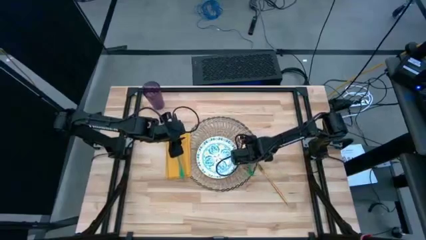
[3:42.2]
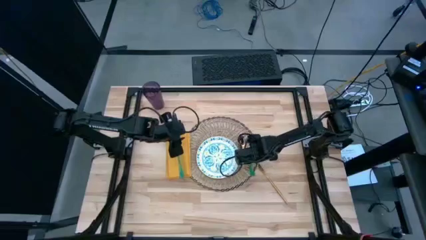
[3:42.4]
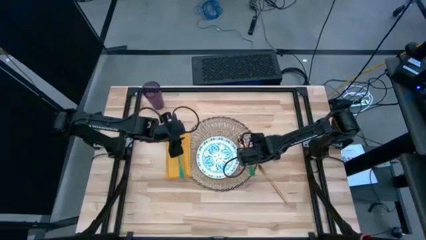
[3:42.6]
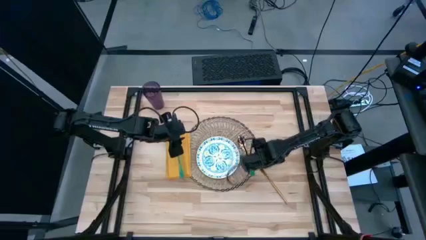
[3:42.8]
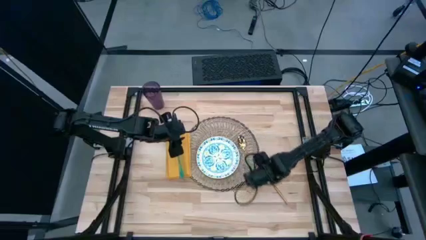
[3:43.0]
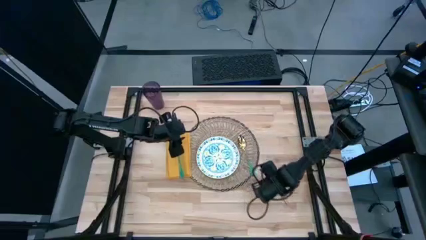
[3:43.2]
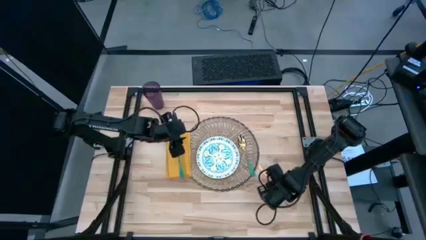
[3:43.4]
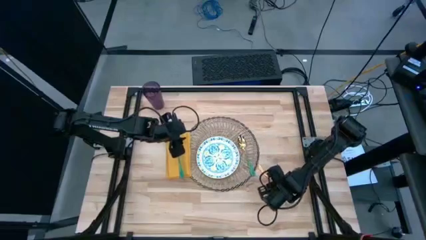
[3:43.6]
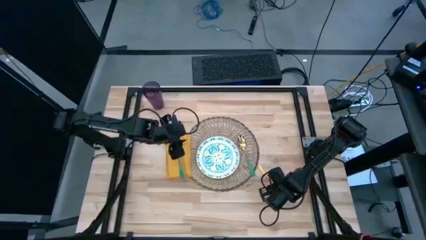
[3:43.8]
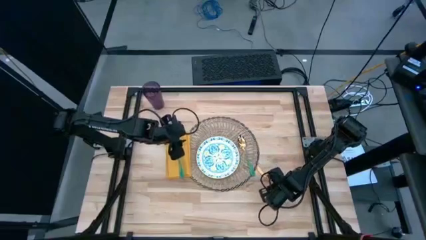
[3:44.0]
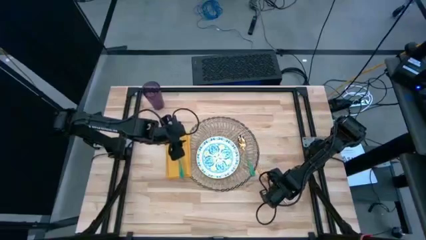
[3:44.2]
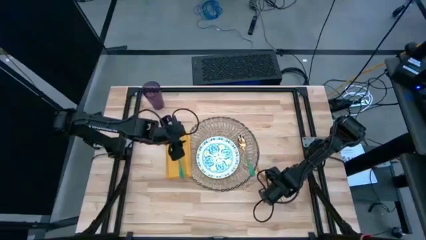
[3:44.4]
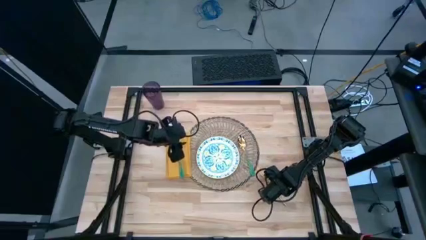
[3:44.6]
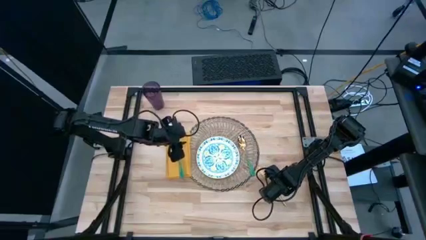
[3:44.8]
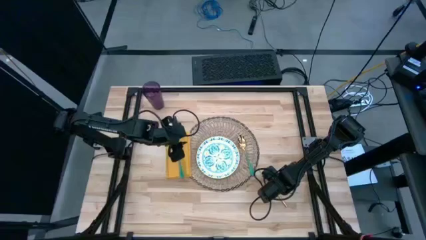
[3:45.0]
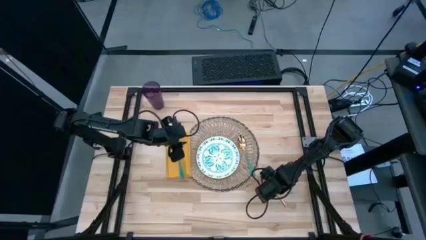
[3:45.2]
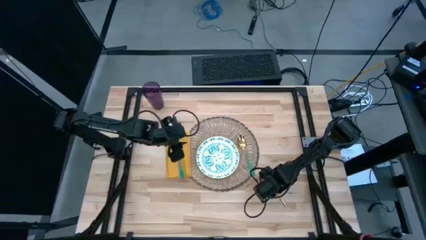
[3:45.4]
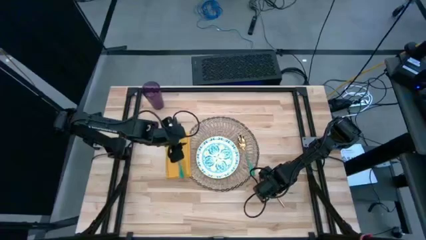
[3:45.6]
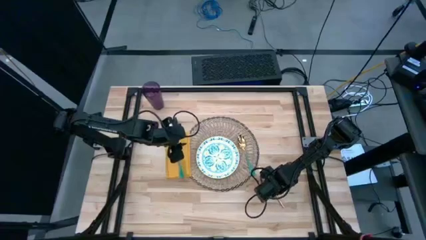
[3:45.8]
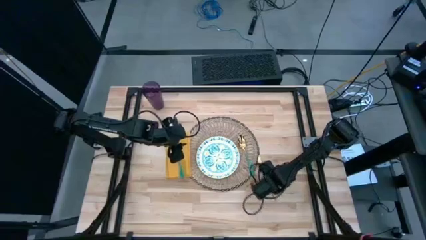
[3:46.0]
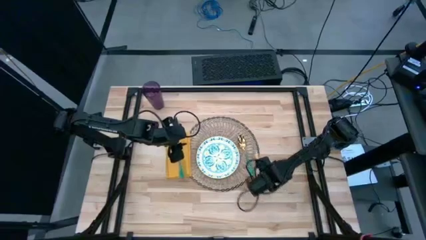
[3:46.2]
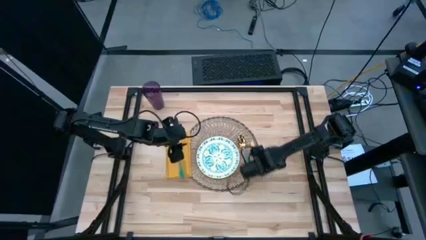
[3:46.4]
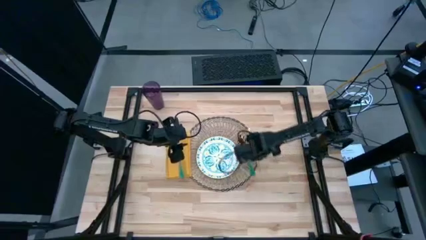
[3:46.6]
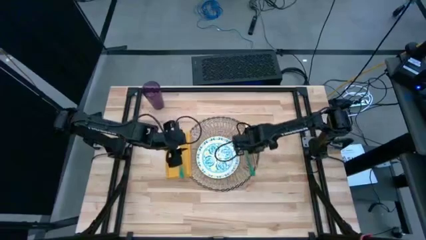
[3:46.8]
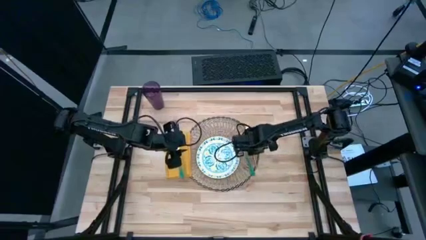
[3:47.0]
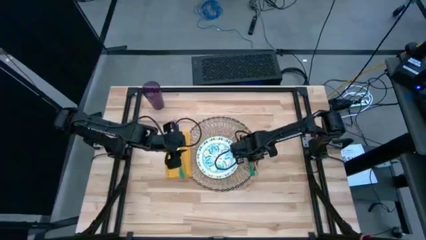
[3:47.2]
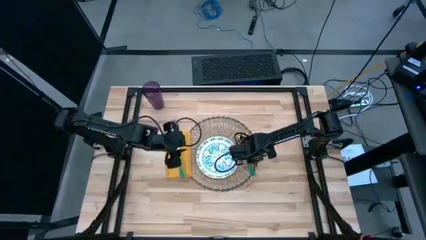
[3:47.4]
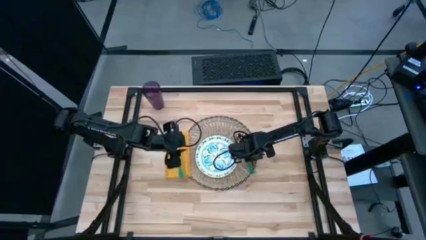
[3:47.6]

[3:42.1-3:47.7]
Task: Set table place
Put the gold table knife on the tablemat to the right of the green spoon

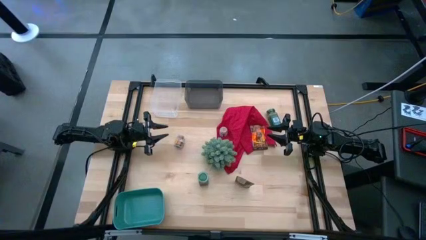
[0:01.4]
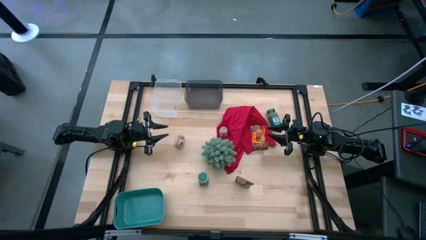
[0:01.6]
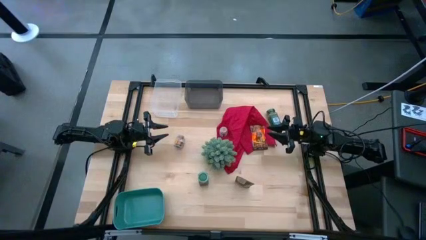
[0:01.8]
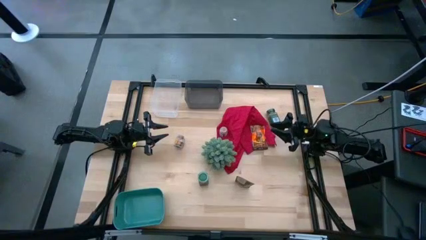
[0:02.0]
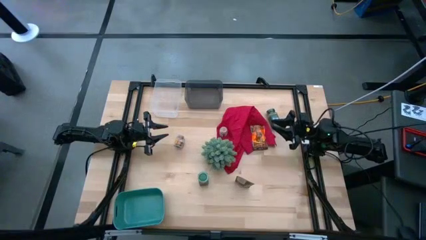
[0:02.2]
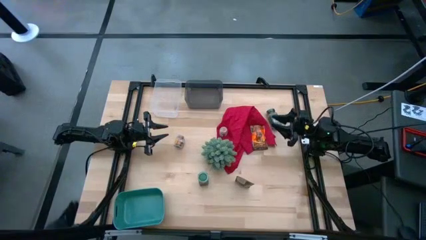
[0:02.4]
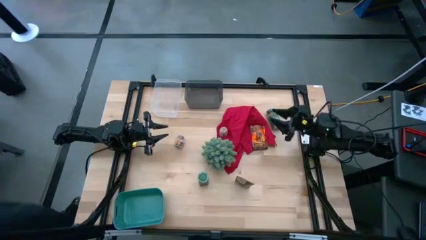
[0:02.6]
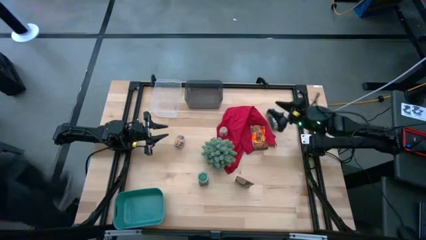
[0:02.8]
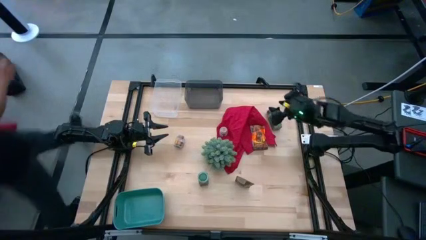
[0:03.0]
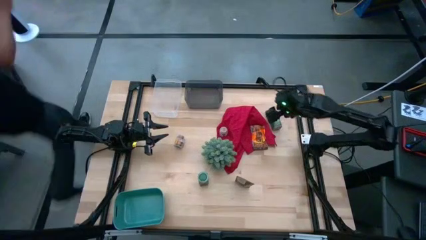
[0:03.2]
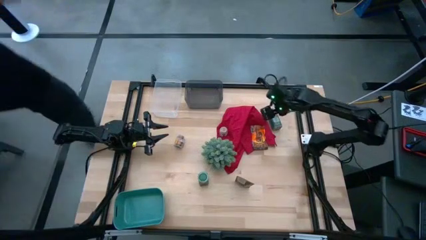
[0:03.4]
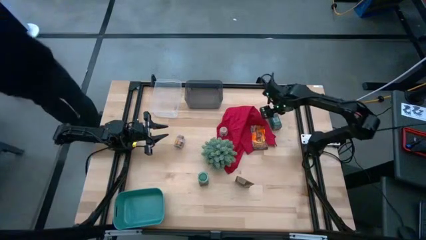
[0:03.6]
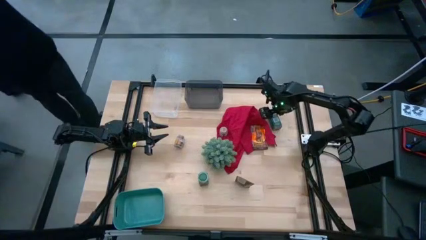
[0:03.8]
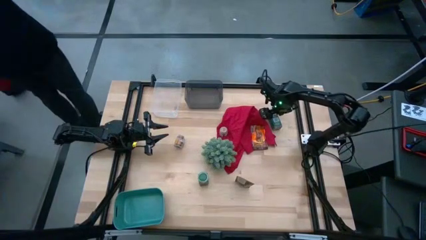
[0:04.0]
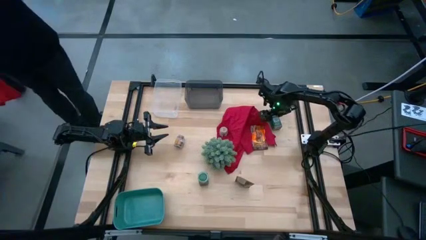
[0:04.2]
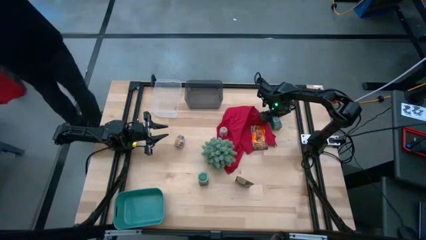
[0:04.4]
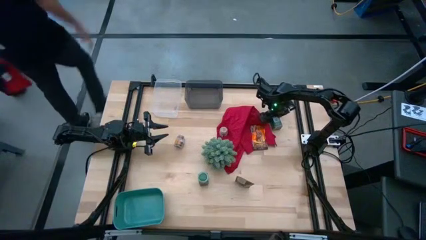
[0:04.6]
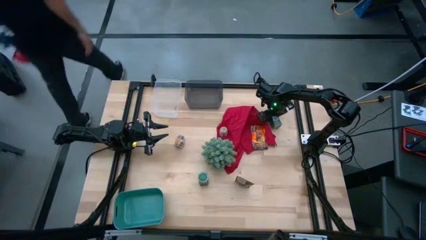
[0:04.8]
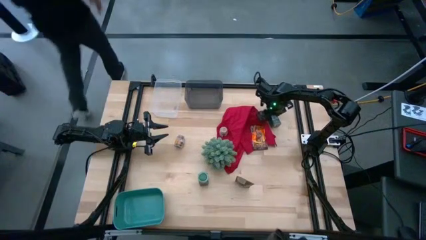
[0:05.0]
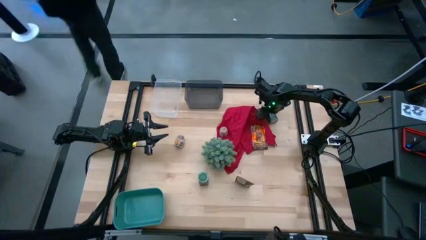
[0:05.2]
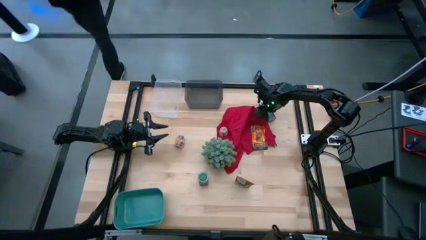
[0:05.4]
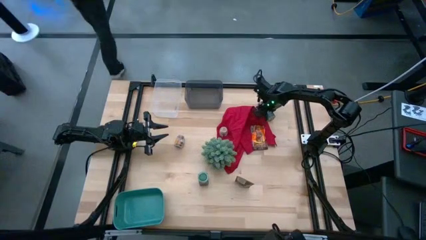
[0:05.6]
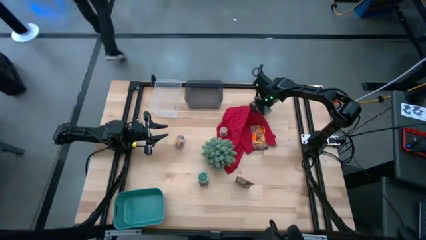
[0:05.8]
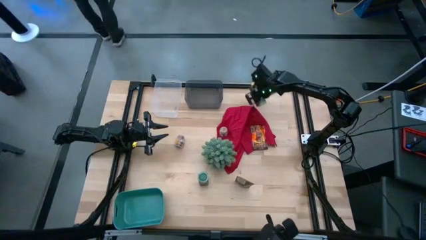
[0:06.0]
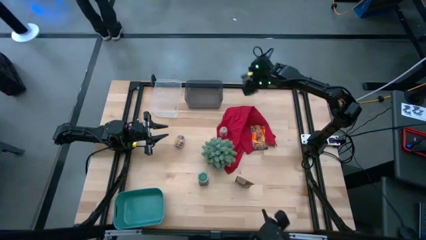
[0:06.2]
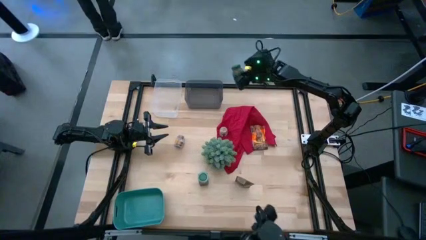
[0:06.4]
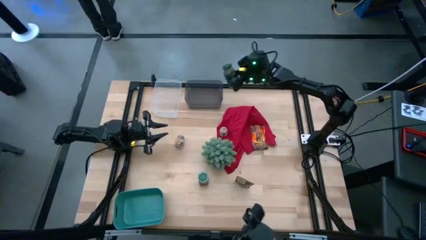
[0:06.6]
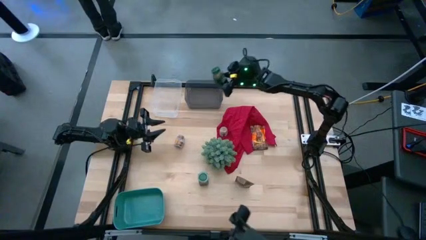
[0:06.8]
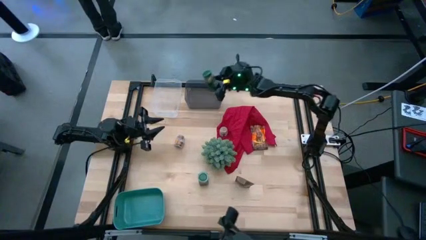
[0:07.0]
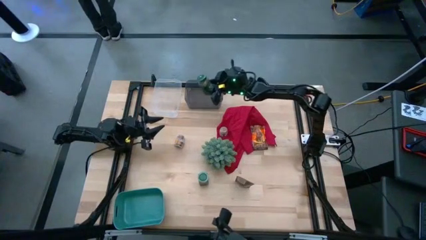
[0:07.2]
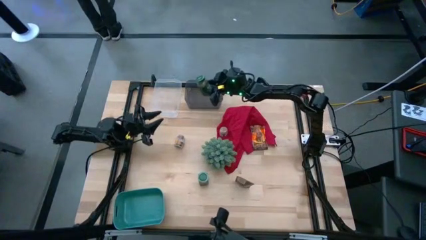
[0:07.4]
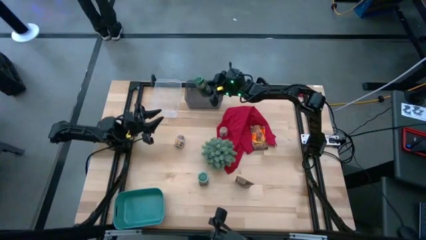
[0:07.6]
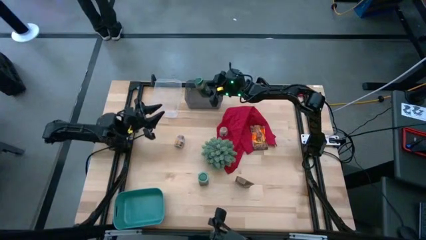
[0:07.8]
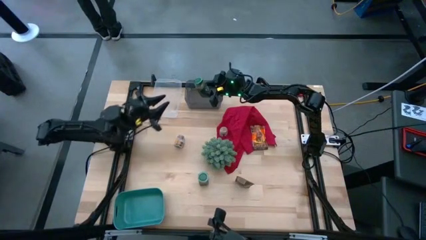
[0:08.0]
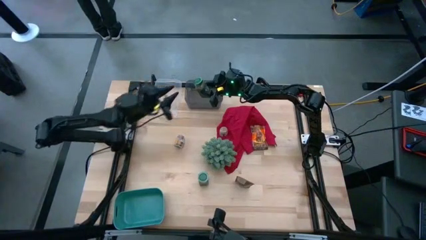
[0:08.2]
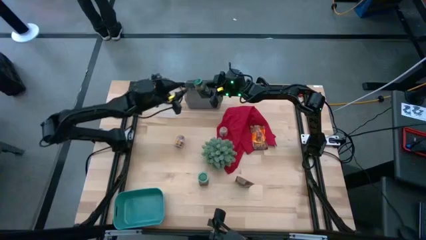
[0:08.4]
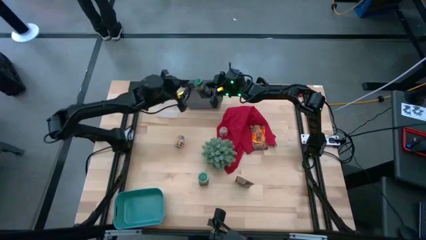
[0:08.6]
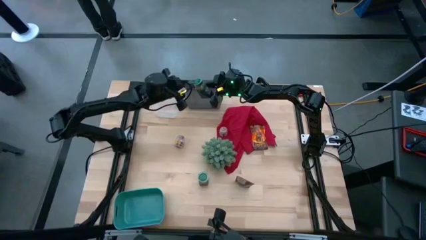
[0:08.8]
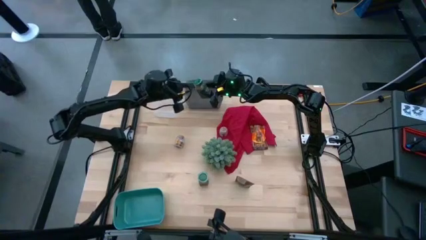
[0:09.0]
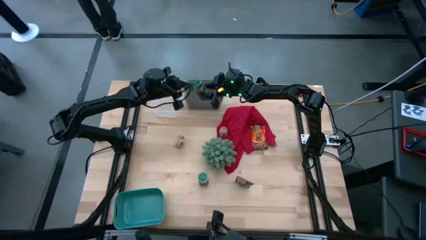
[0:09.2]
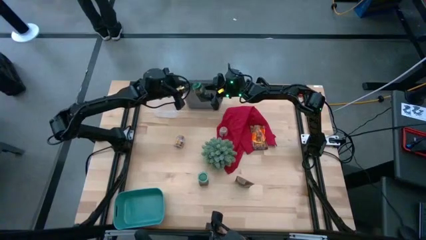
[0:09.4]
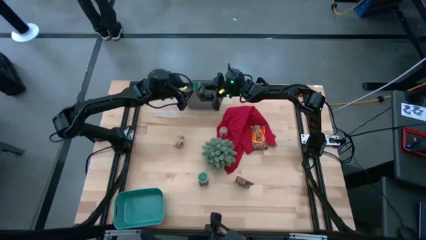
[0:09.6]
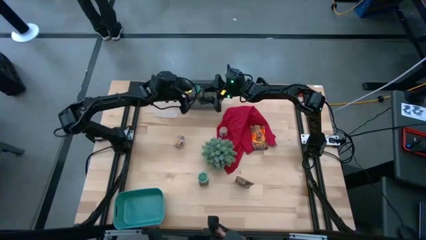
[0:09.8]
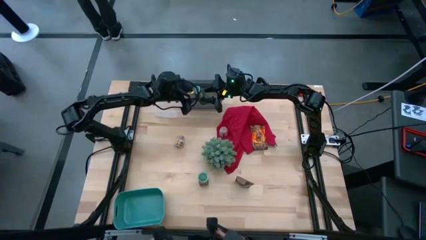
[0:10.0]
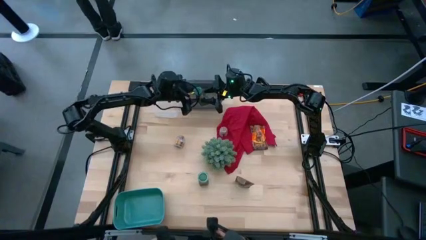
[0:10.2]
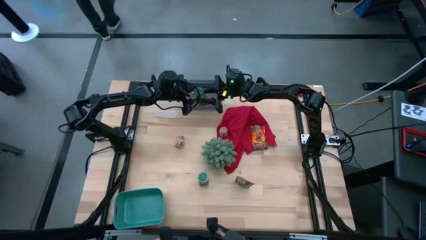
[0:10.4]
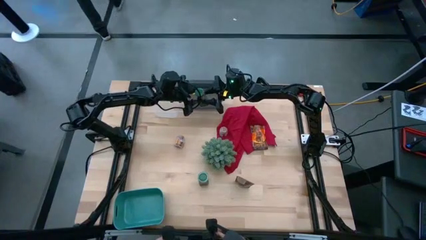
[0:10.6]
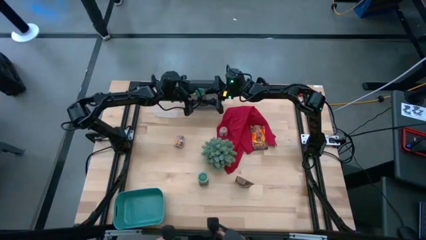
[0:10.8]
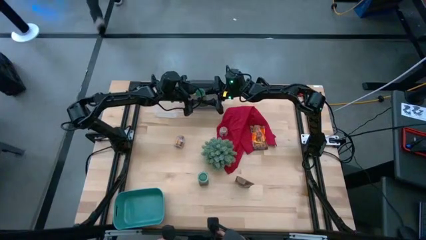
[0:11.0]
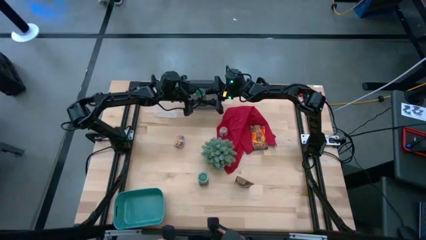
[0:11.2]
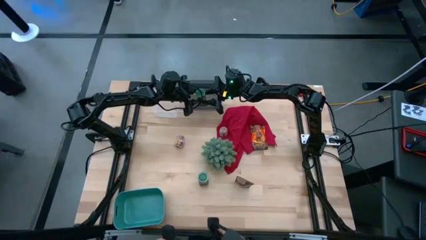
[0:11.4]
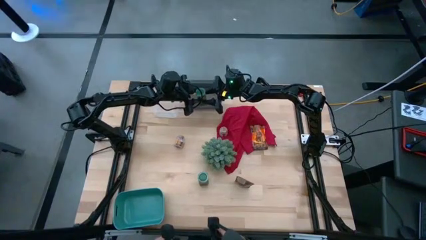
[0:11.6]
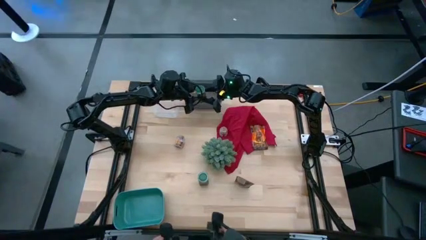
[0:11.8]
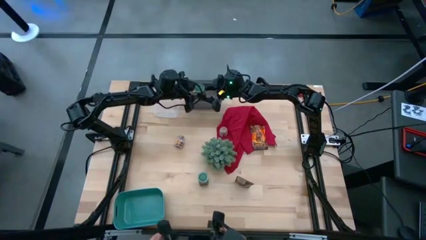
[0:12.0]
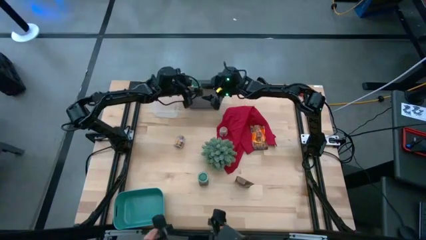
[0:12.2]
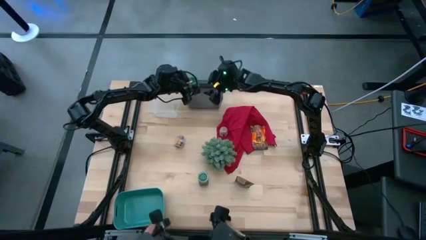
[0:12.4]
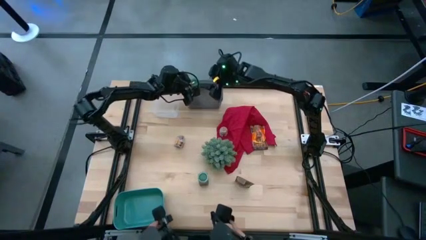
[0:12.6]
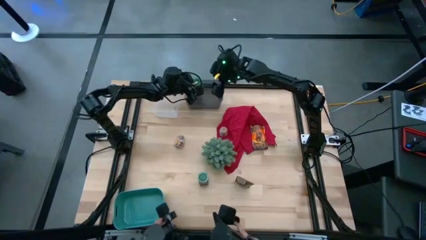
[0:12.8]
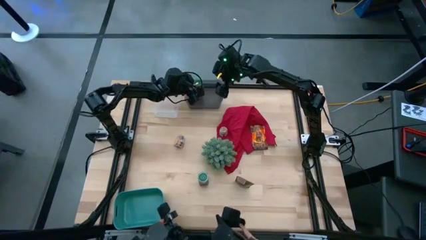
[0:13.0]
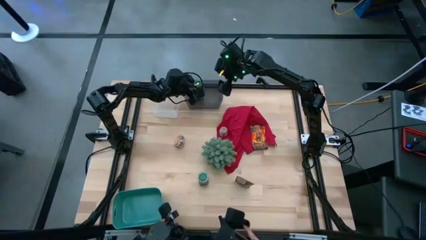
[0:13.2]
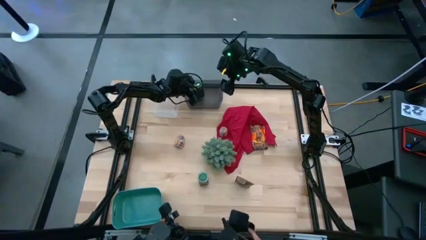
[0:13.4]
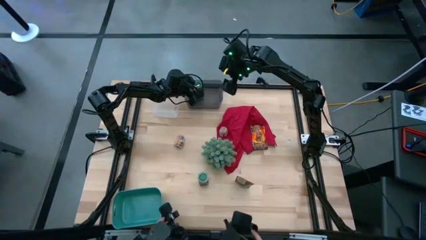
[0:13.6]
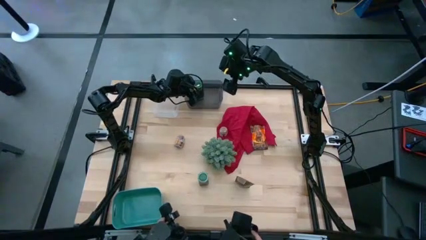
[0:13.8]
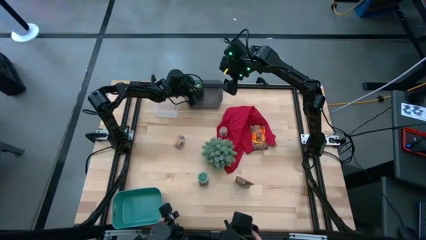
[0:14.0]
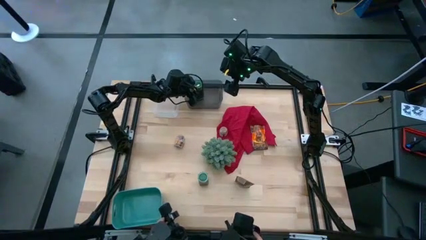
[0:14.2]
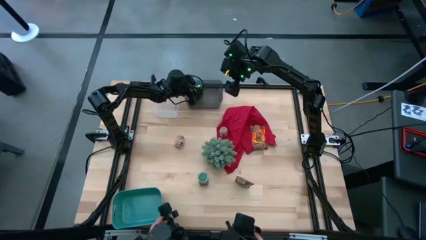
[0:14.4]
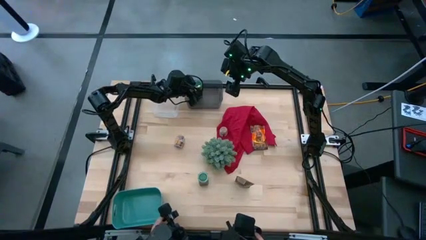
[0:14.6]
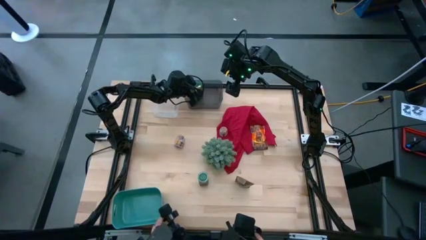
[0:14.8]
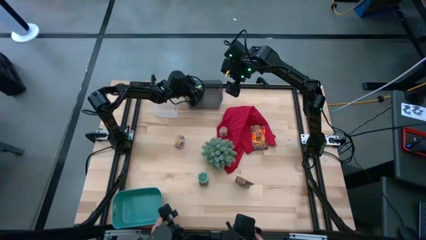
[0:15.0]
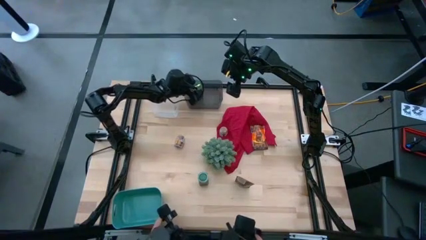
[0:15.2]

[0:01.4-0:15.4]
Task: Sort spices by type
Put the top green spice bottle into the black bin
